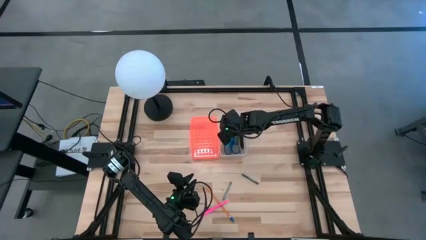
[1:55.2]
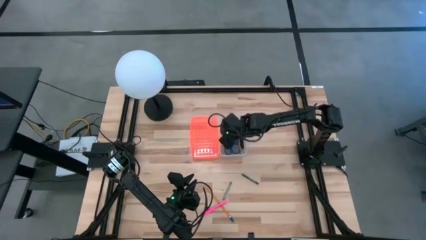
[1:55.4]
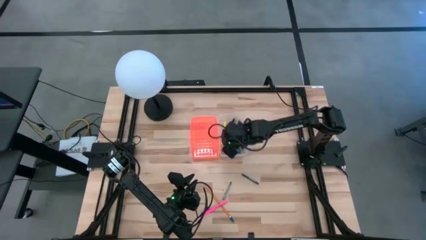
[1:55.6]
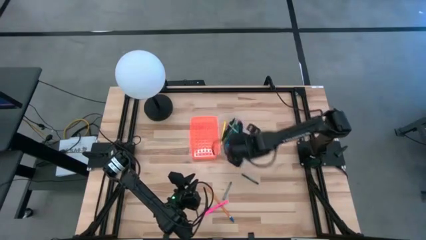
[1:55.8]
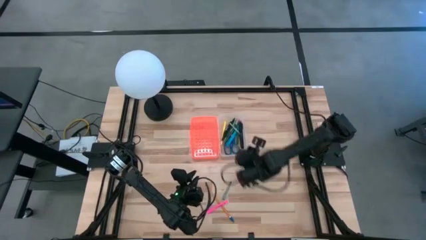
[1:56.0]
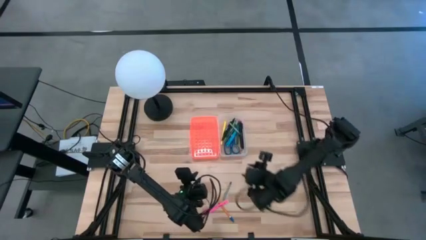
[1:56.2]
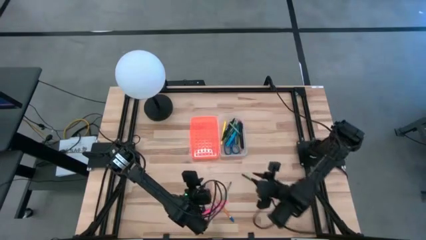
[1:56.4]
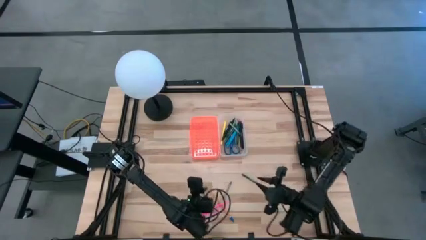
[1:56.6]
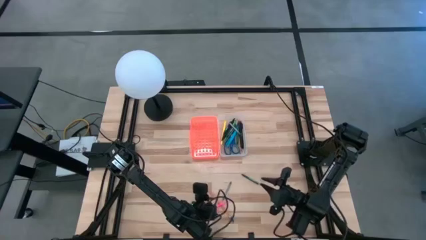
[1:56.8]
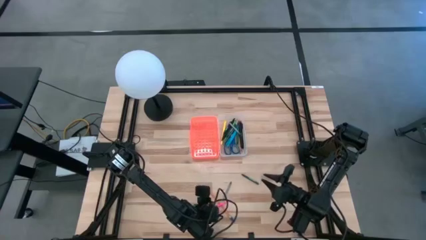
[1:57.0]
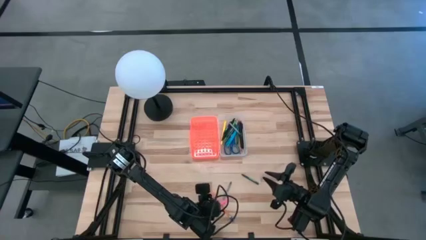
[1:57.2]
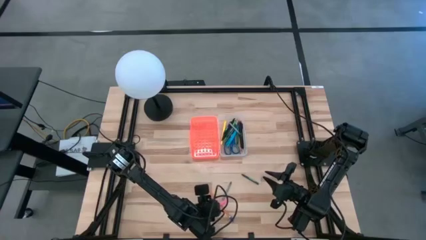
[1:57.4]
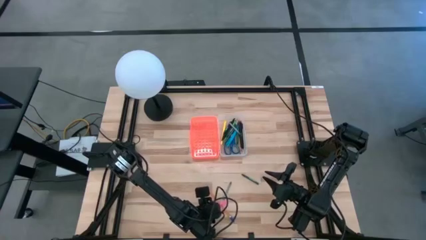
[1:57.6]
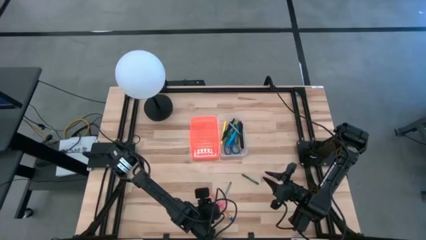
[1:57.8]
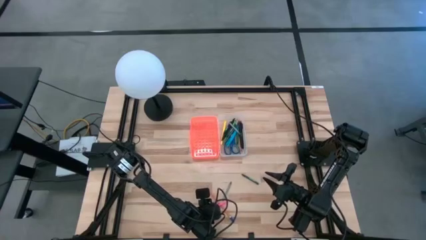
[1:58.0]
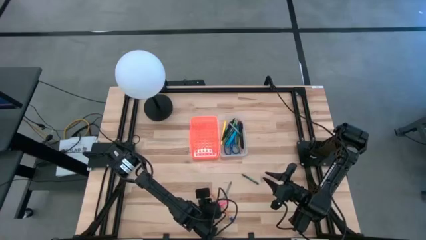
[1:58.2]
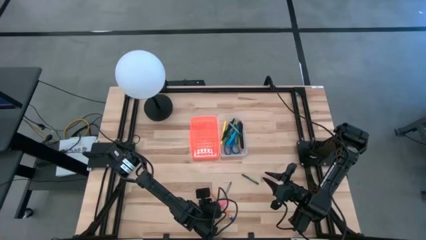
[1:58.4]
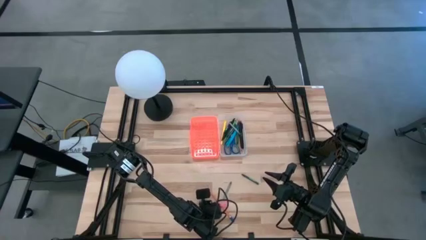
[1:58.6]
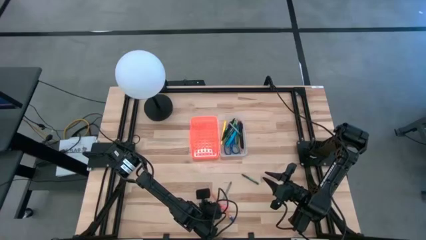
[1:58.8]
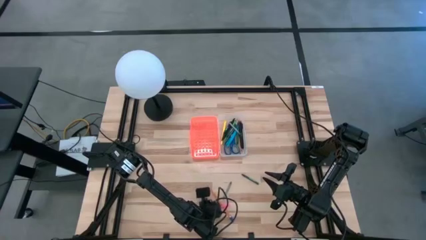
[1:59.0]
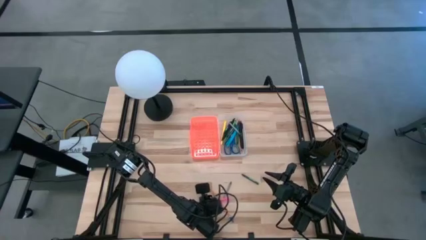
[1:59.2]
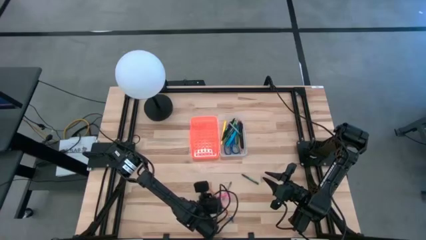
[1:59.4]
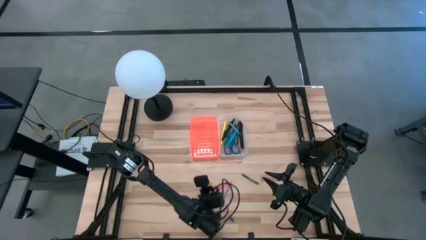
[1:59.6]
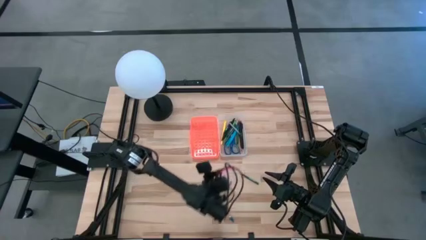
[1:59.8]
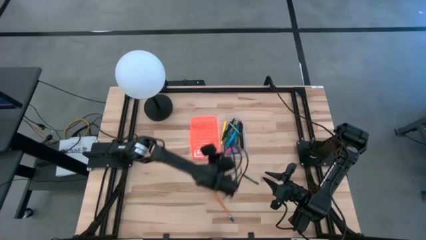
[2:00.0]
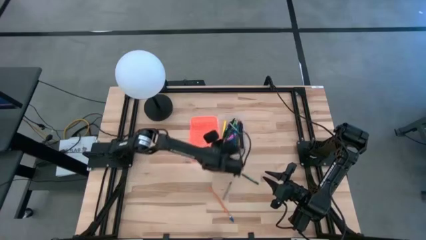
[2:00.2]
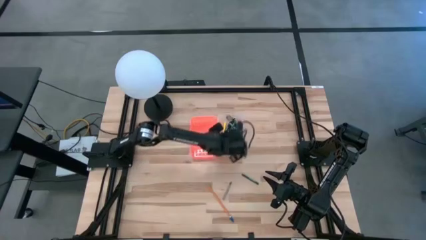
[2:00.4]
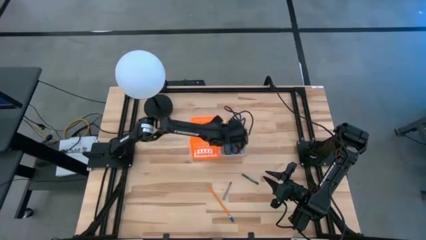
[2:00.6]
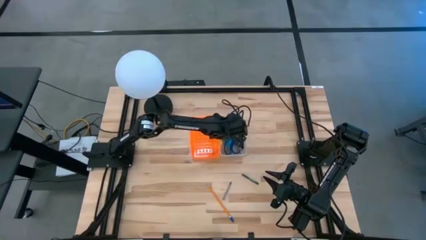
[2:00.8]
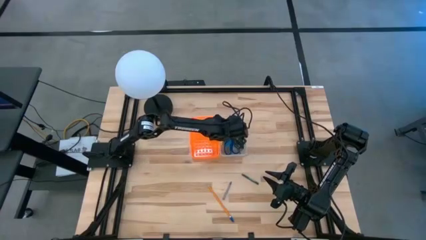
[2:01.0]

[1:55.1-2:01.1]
Task: Pick & place school supplies into a supply box
Put the pink pen into the orange supply box

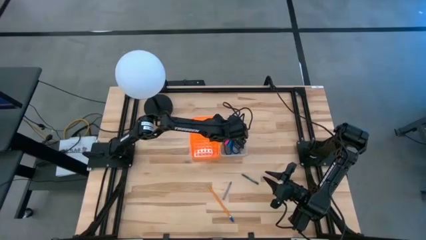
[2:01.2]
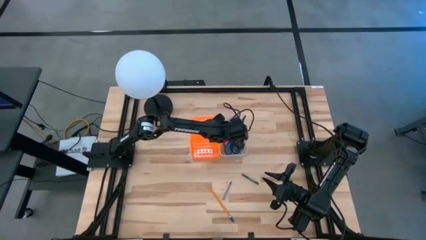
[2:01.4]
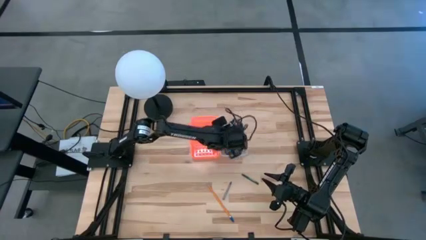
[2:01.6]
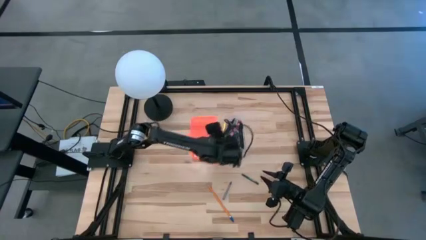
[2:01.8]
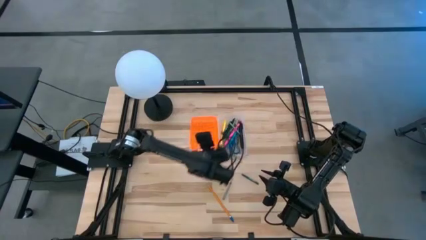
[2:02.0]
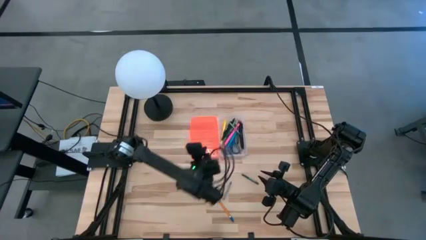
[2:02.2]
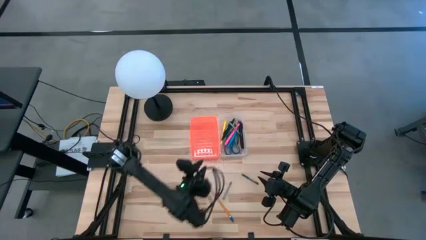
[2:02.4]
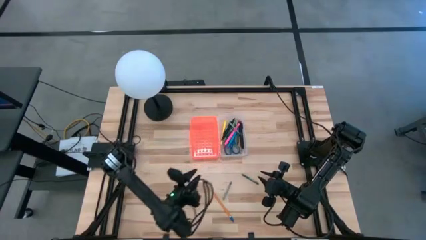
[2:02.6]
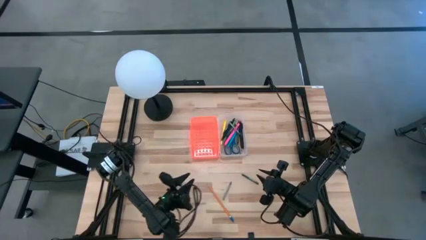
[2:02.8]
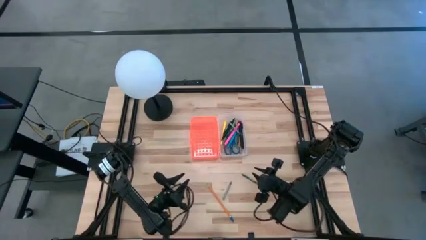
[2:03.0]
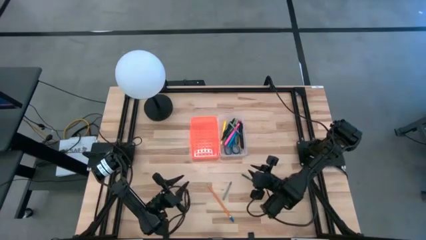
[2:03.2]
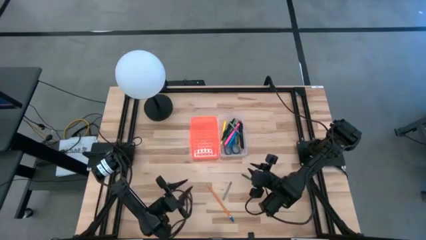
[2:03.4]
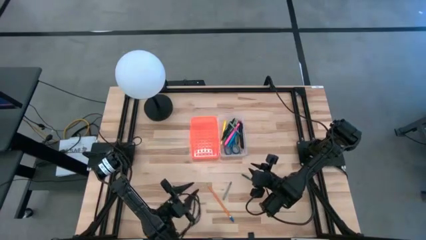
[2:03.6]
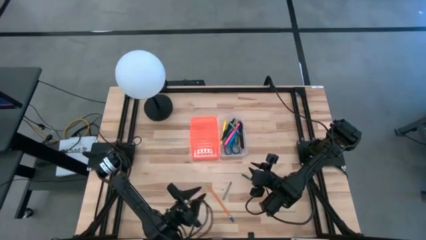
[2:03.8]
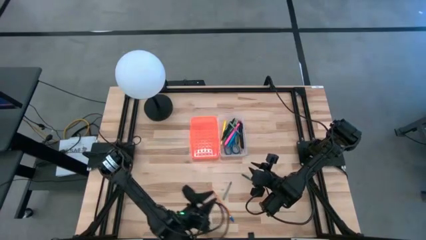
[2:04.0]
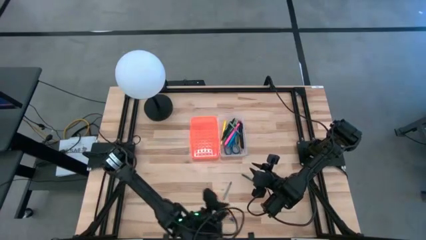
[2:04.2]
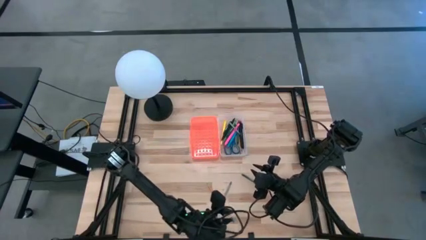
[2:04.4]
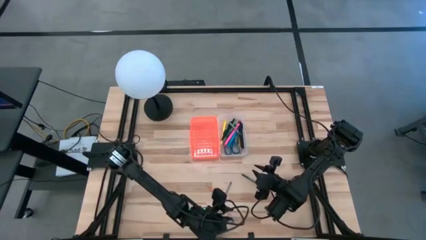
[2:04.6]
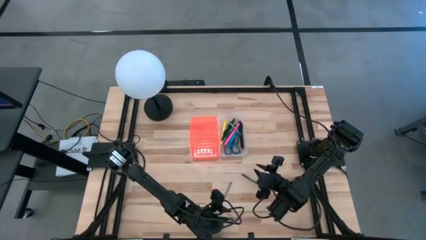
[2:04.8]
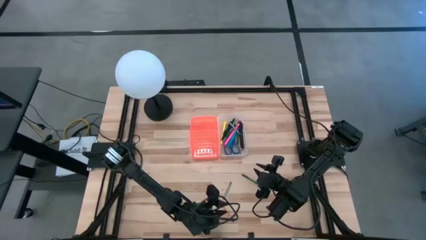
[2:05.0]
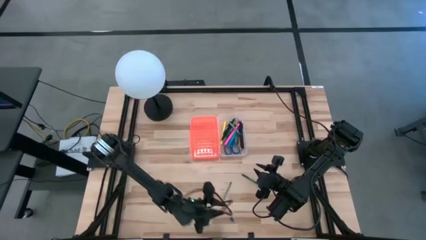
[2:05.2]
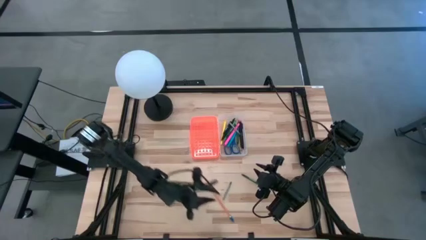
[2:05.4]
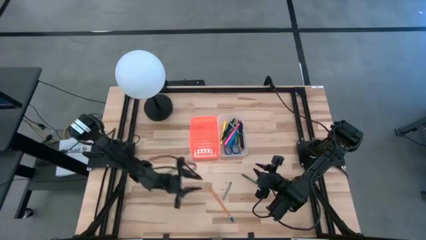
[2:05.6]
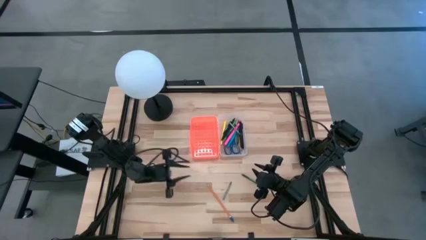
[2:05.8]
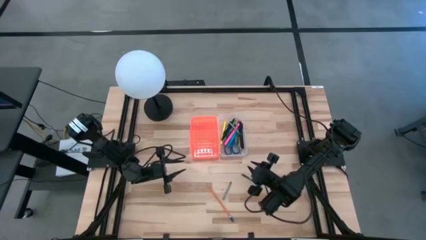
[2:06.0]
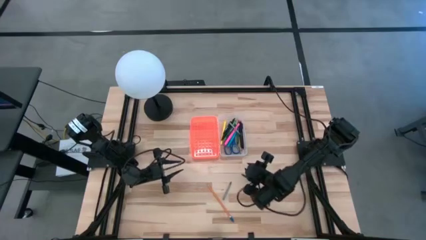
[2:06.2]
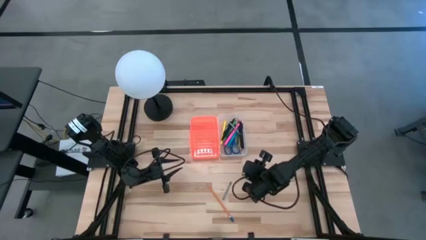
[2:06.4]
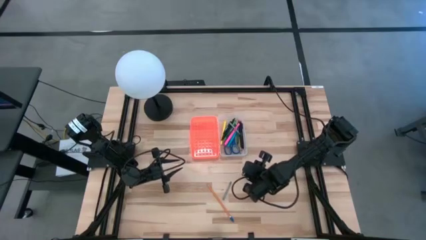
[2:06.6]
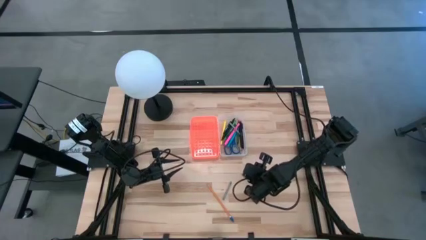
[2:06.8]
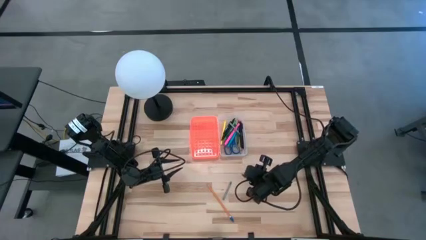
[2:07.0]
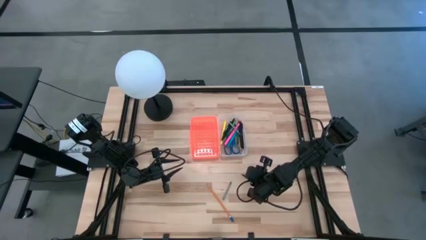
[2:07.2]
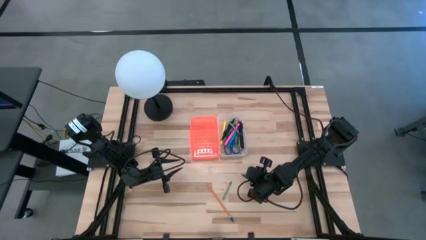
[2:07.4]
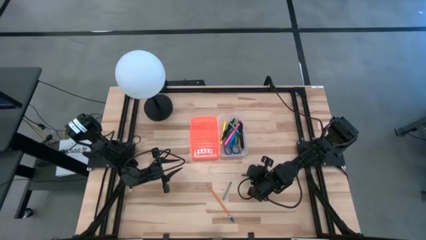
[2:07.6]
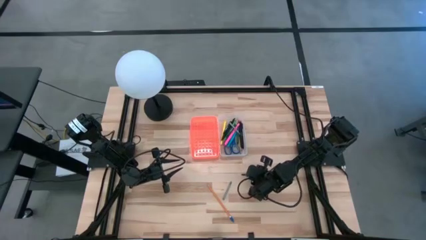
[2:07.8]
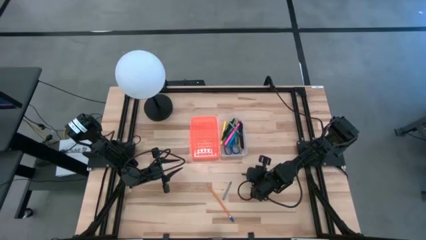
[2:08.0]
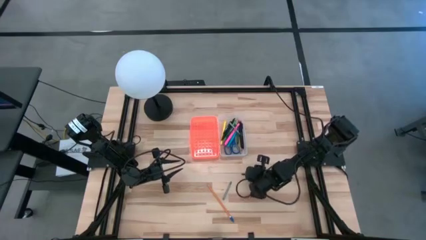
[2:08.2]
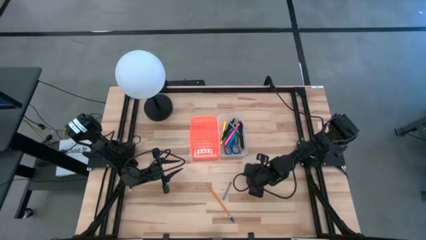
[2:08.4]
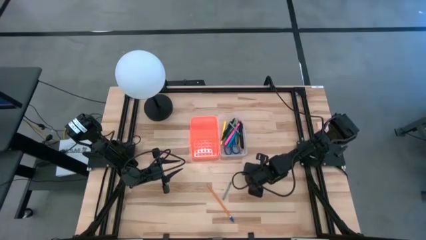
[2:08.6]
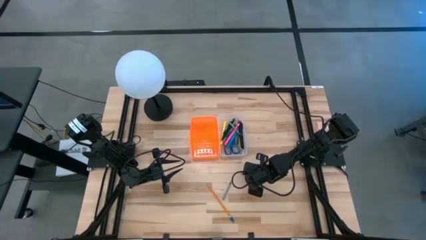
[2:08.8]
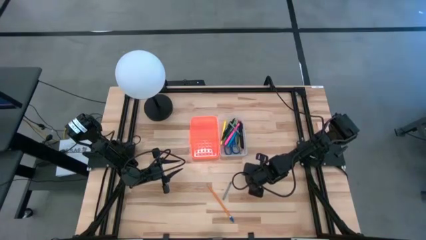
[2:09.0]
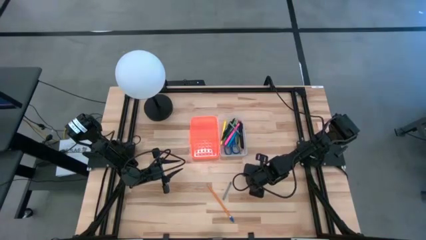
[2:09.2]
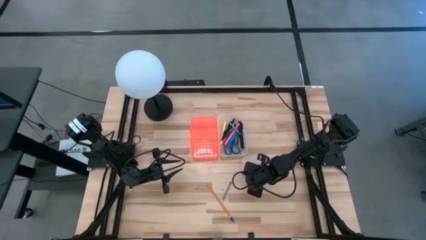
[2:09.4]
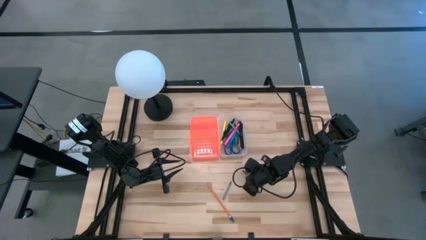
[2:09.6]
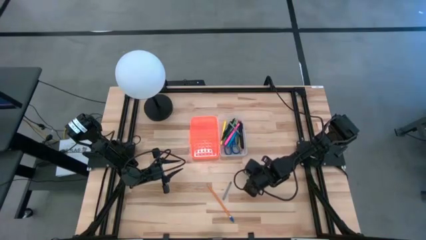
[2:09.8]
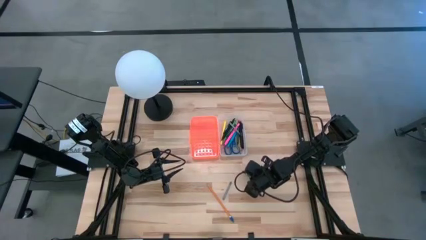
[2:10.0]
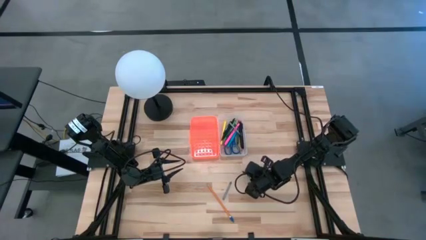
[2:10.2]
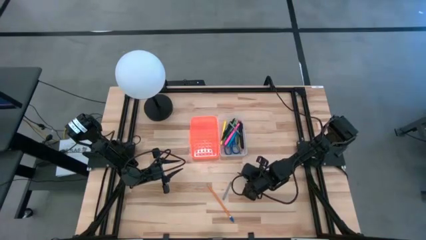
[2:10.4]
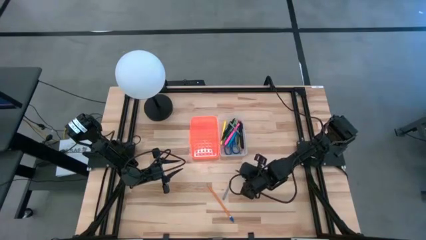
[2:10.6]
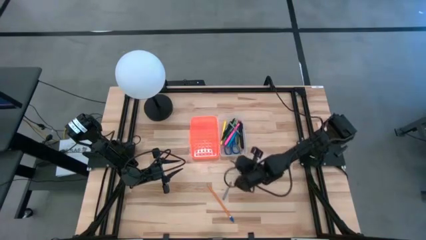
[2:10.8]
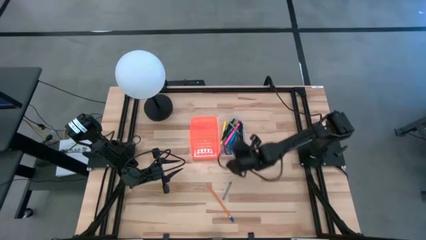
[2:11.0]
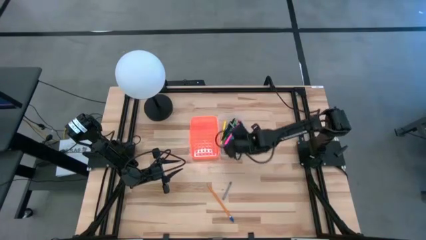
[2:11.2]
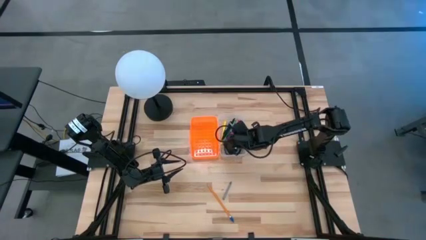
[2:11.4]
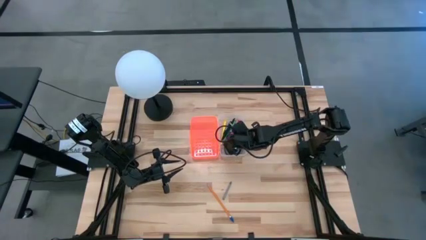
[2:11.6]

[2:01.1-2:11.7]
Put the green crayon into the orange supply box

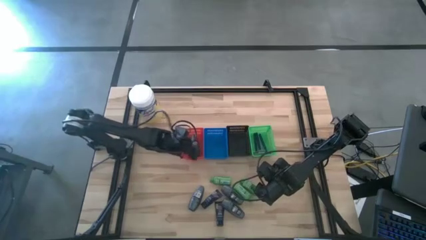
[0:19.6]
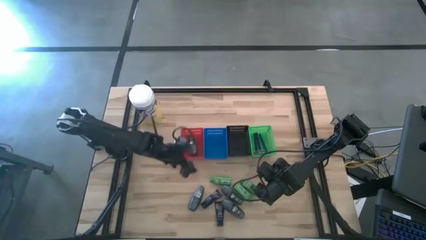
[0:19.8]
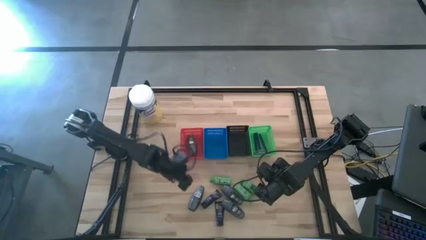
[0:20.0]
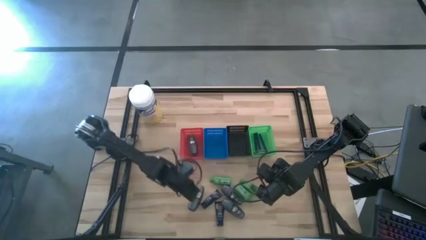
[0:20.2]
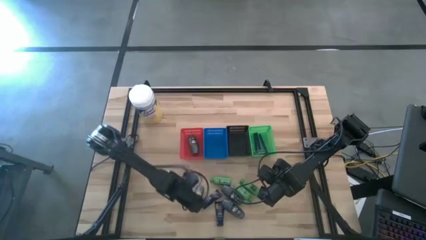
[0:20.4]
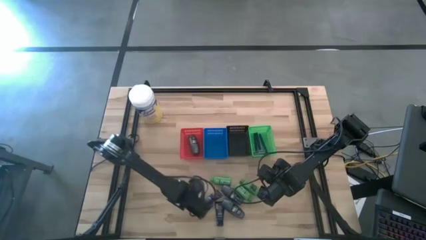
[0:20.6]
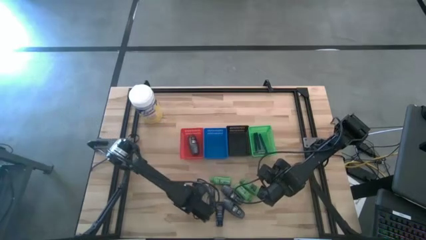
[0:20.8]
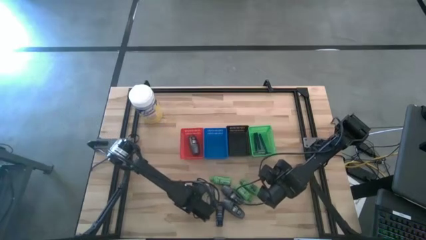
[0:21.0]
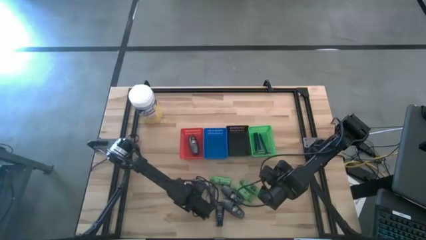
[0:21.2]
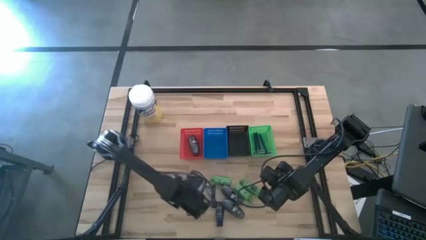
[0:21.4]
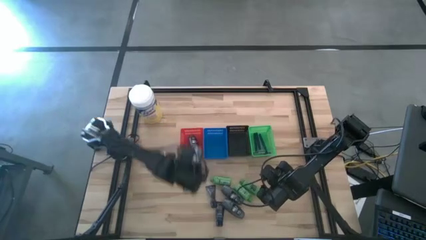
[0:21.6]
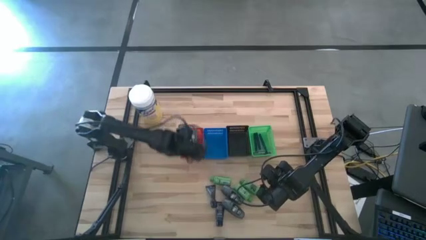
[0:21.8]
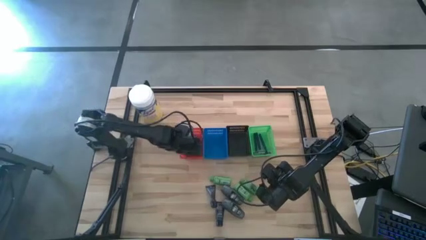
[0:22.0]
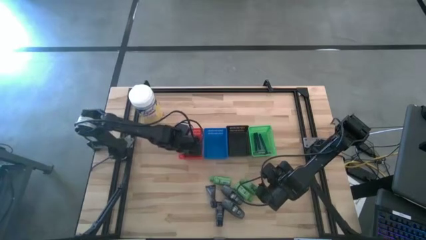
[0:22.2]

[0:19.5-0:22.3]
Task: Pick & Place Travel size toiletries
Put the black deodorant into the red bin
